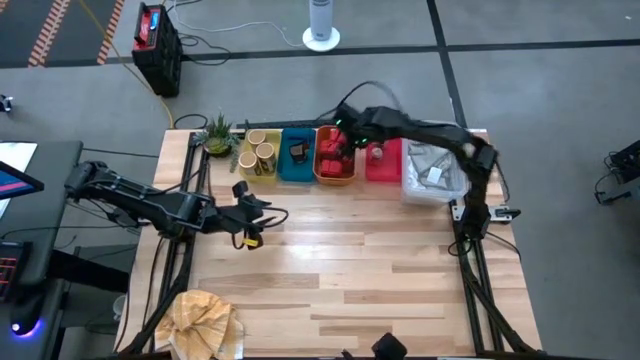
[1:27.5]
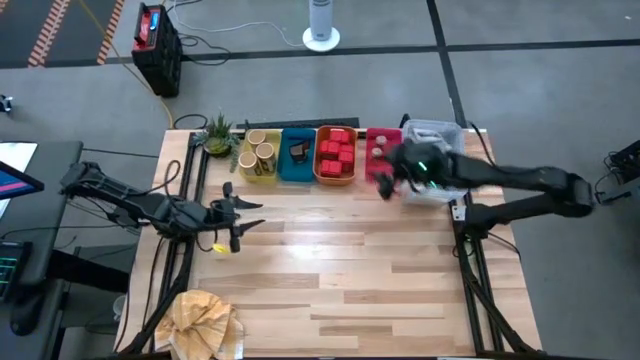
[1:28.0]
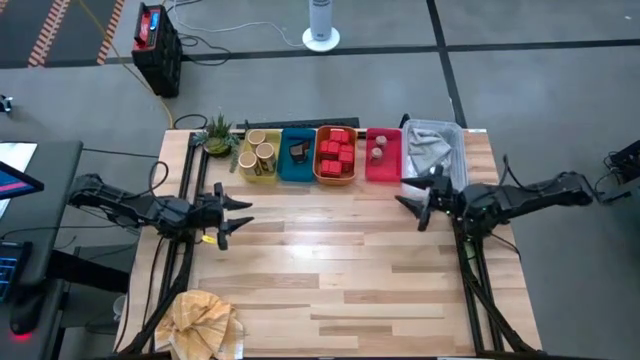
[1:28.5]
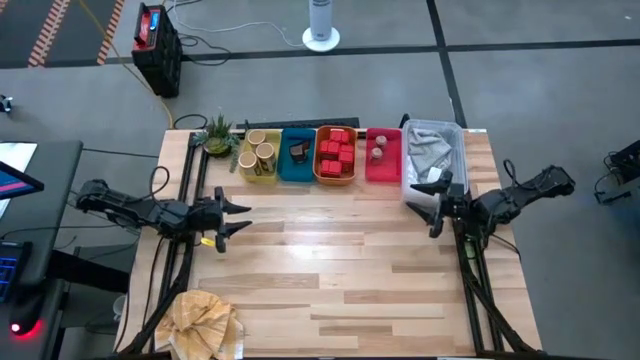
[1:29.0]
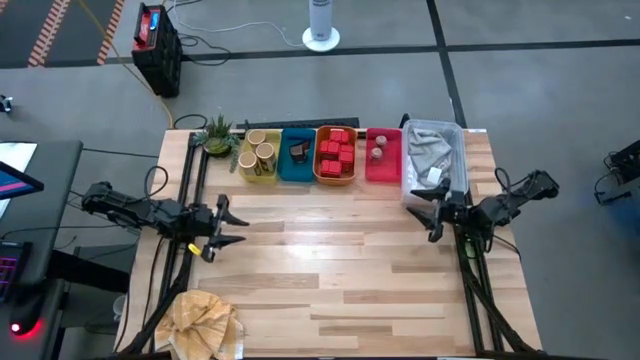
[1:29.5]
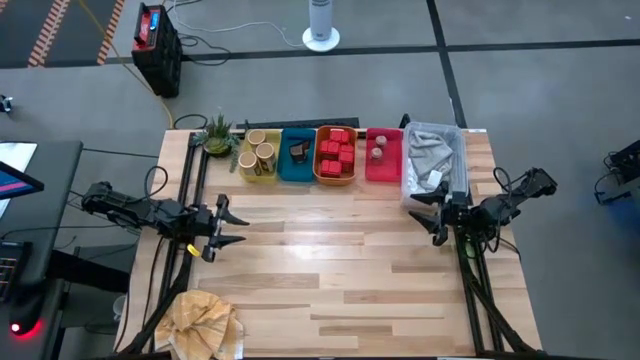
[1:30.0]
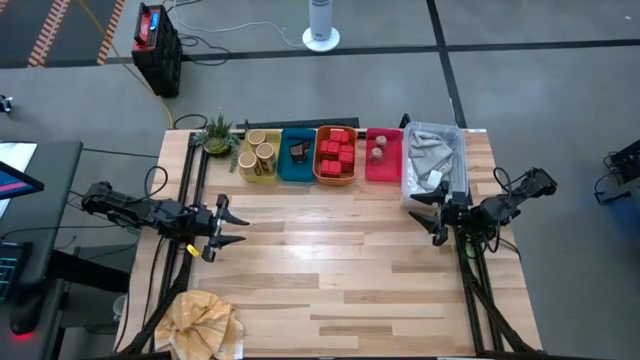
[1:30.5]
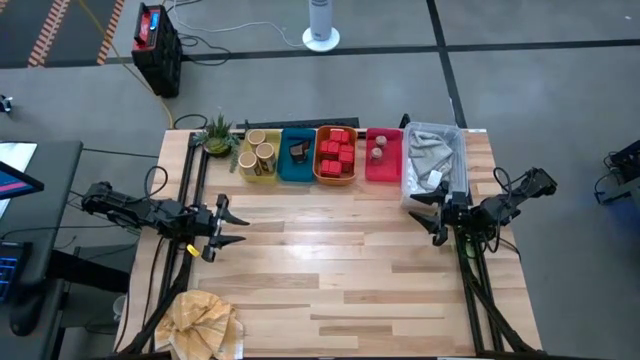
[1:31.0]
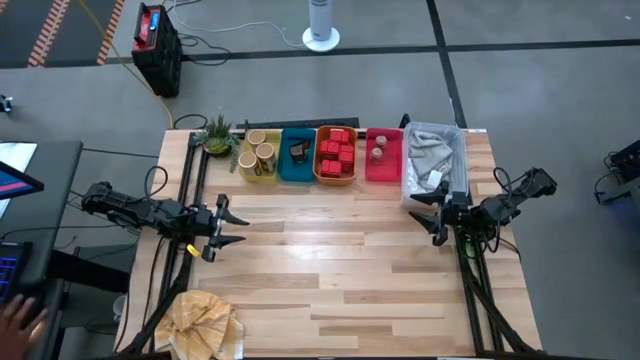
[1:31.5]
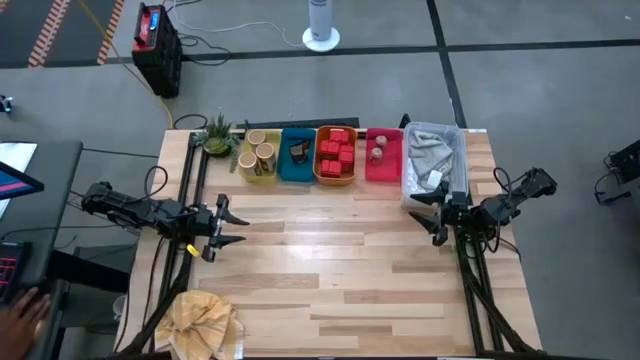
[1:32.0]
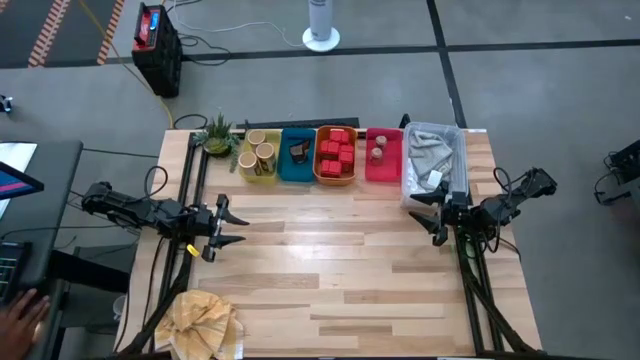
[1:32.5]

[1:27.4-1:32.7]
Task: Sort spices by type
Return to Home Position

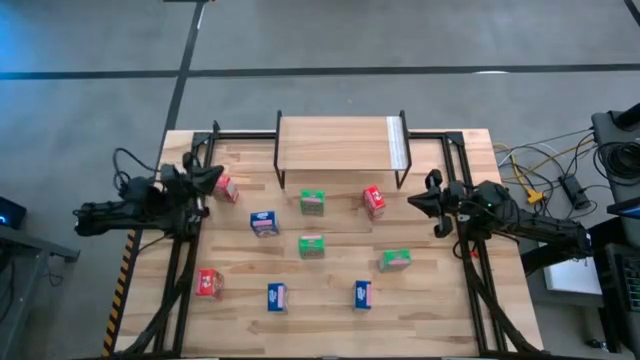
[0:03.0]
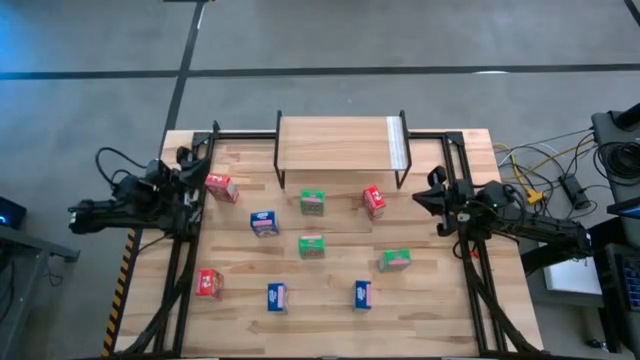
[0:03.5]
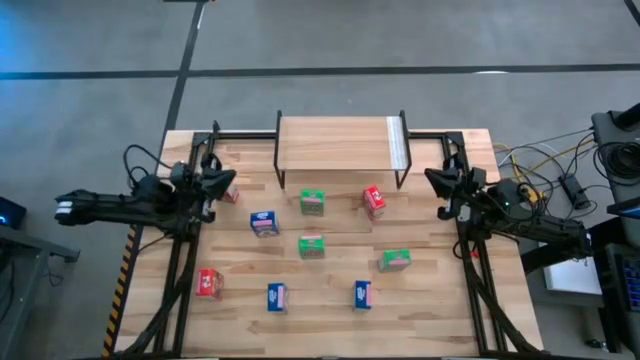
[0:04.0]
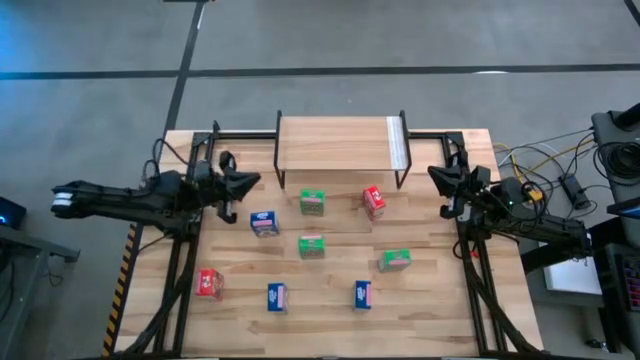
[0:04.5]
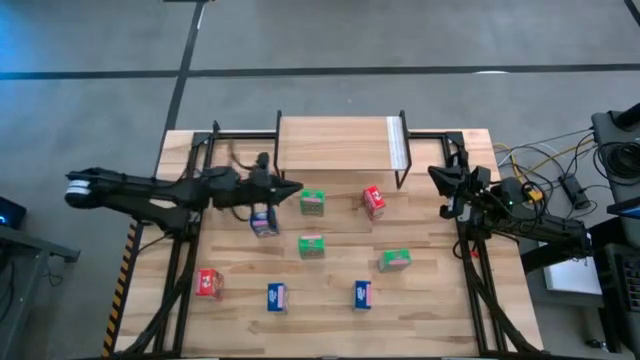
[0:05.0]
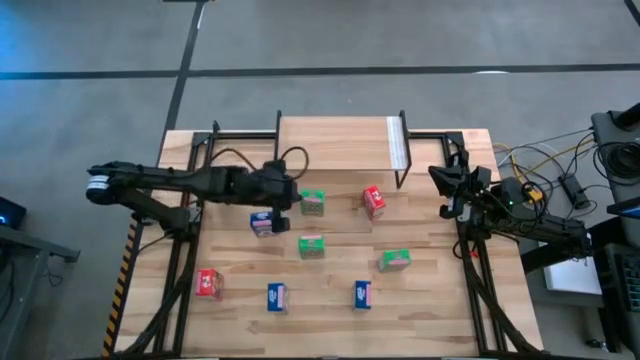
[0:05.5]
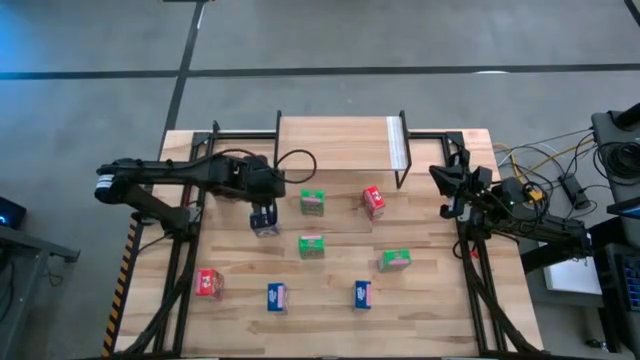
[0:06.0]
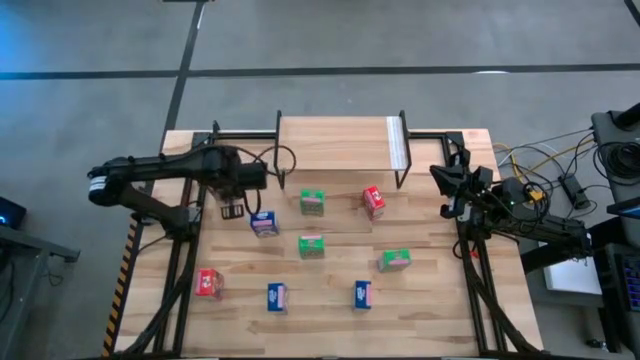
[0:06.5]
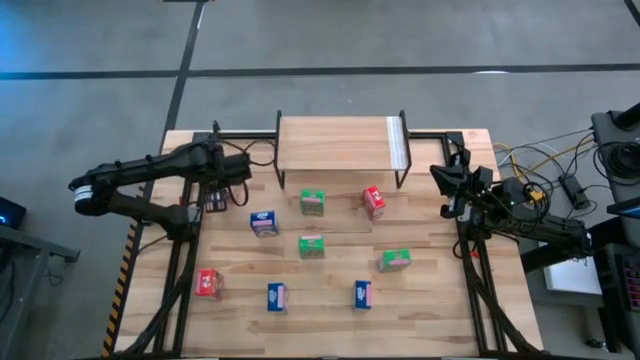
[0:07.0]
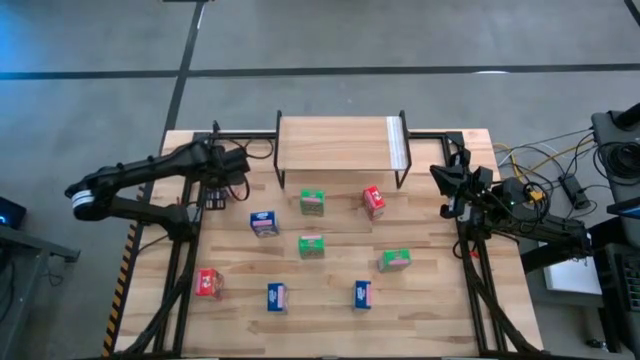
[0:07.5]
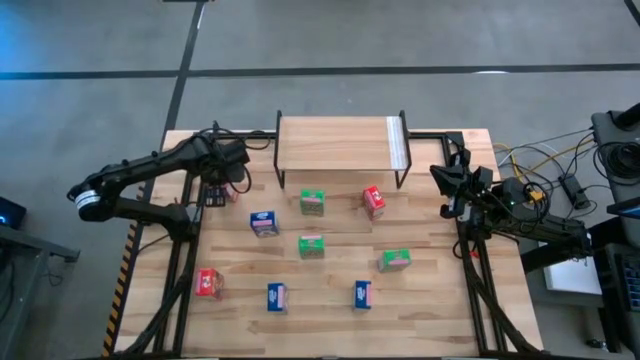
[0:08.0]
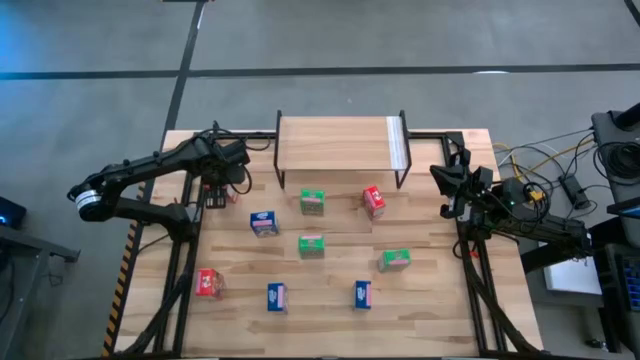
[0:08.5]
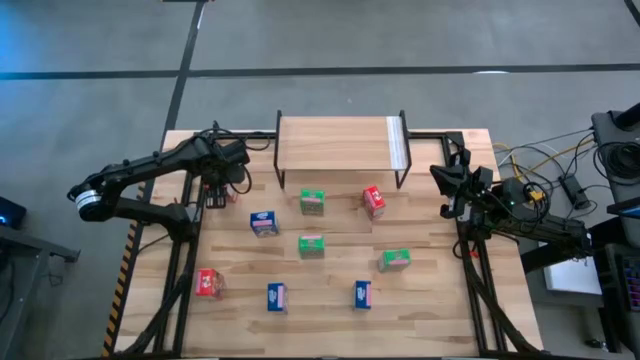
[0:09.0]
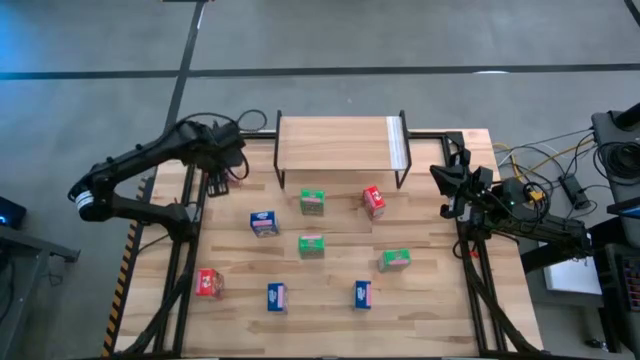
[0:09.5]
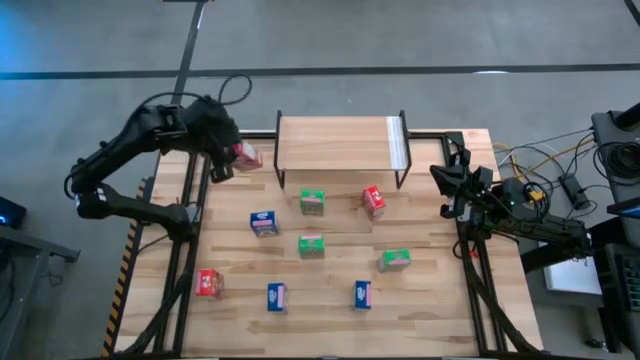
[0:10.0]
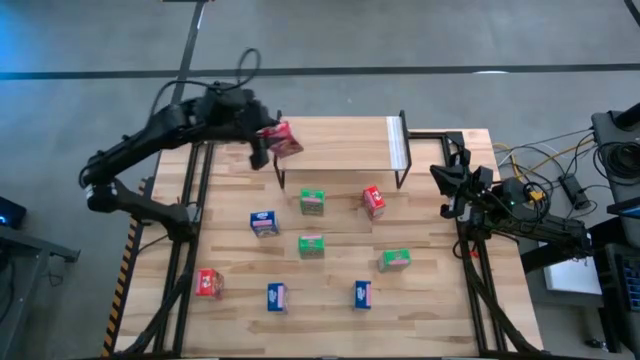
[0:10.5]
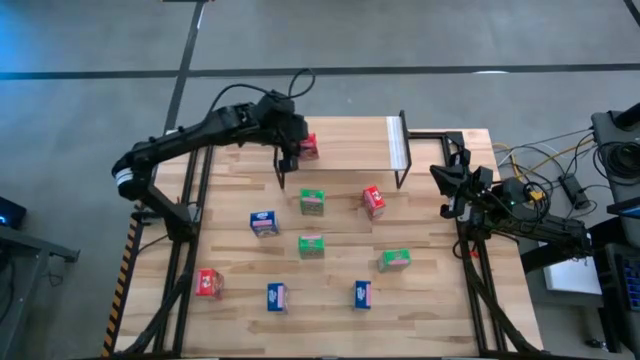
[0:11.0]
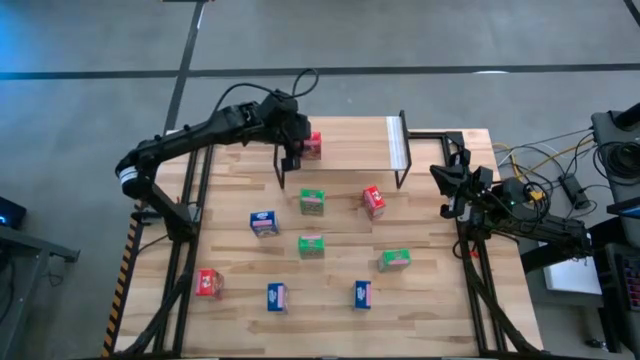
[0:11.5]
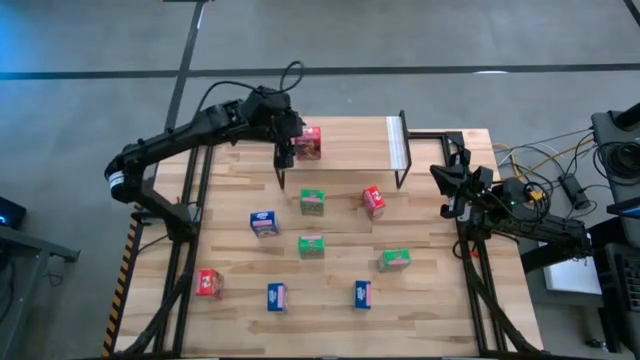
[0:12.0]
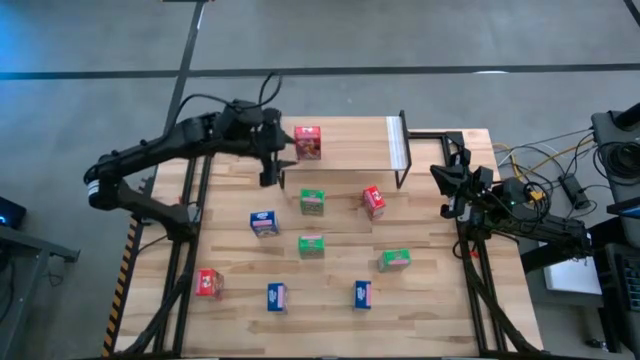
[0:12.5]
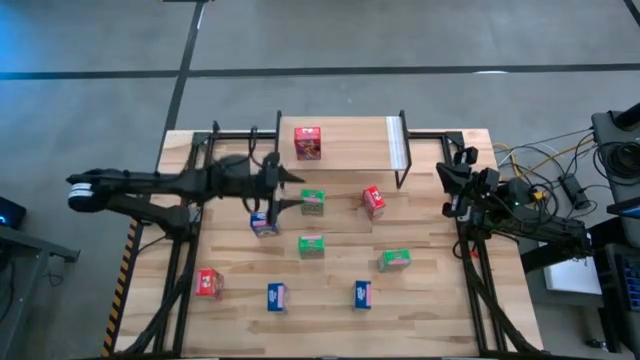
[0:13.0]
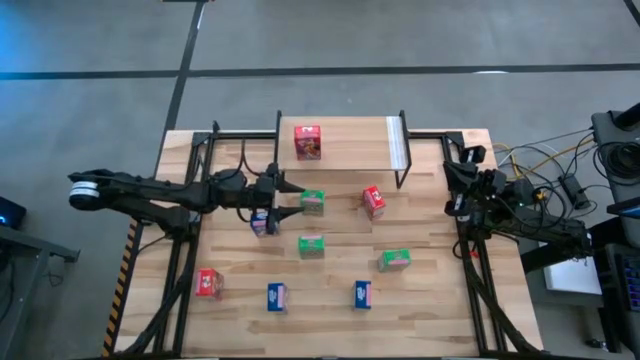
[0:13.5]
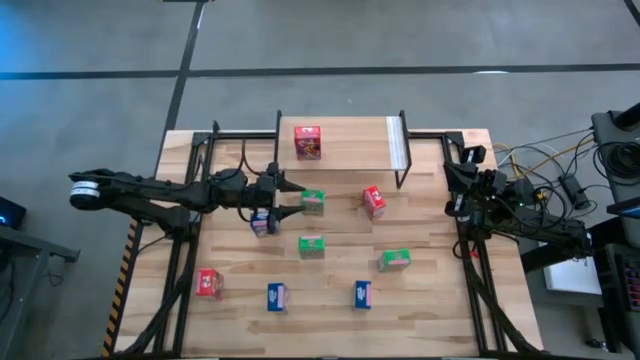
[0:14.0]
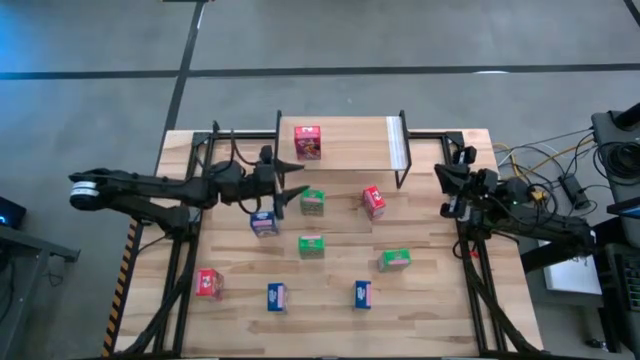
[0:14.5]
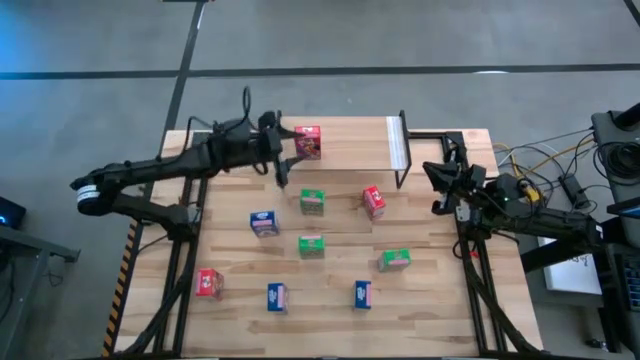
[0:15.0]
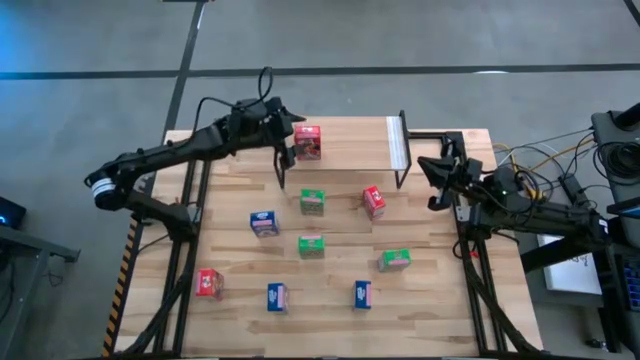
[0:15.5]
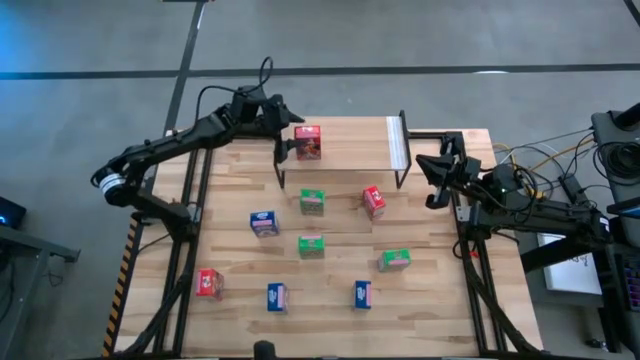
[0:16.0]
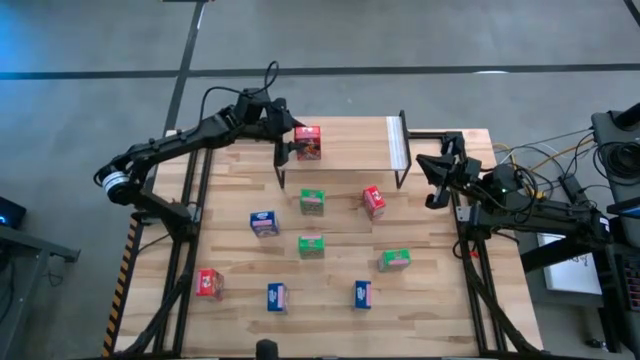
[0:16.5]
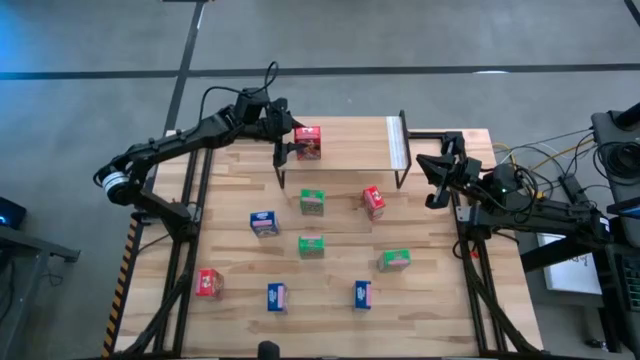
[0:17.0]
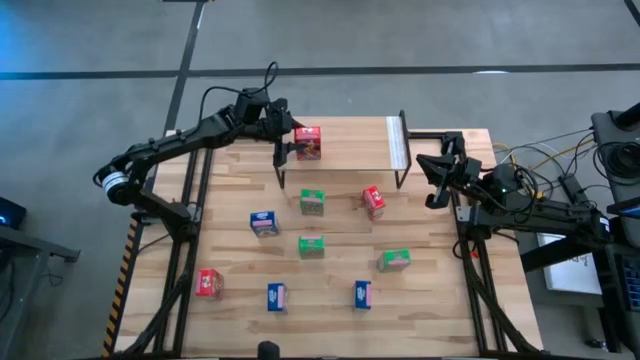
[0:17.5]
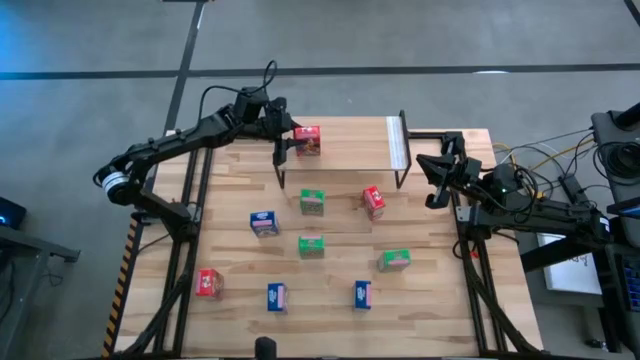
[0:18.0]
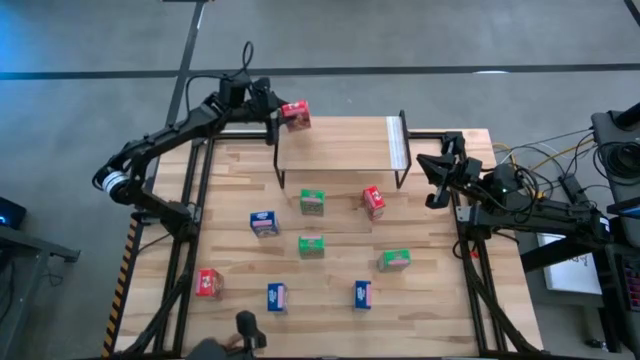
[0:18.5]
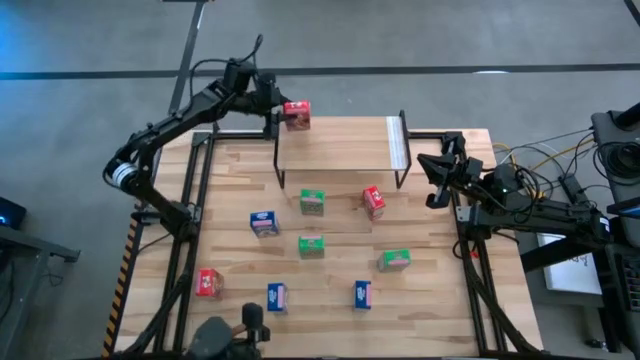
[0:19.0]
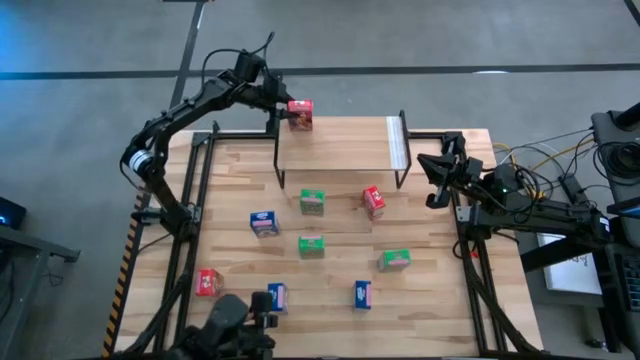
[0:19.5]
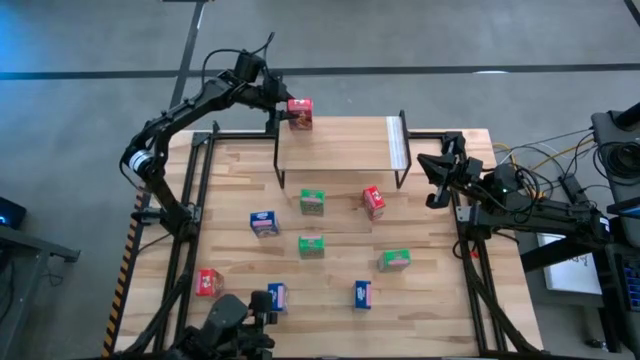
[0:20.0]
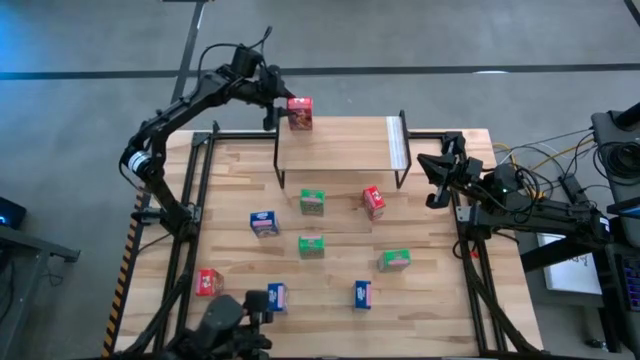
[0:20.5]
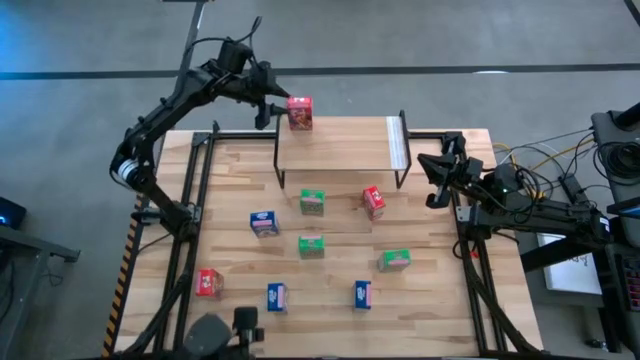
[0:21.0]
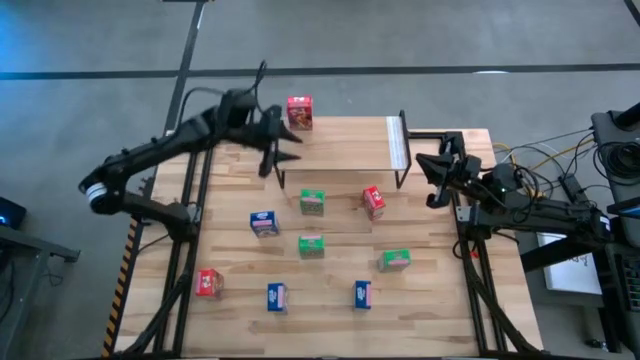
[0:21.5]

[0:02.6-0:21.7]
Task: Stack cereal on shelf
Put the top left red cereal box on the shelf
